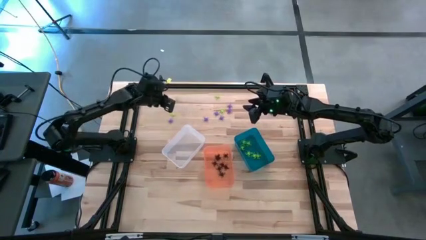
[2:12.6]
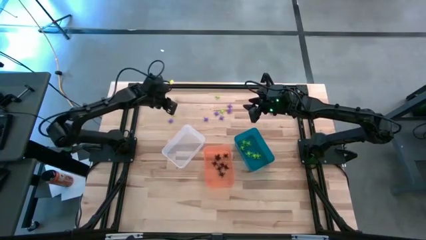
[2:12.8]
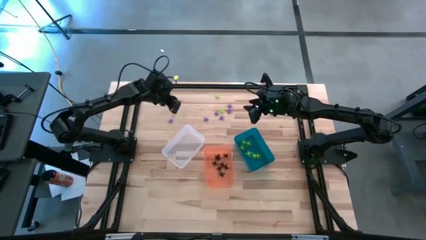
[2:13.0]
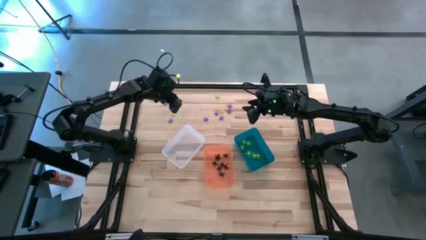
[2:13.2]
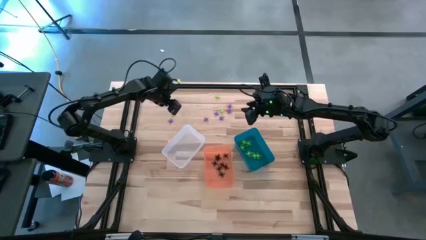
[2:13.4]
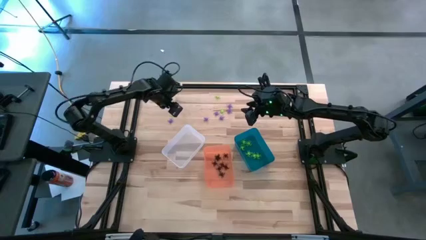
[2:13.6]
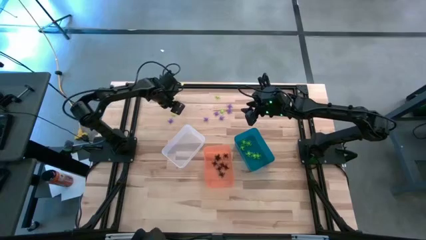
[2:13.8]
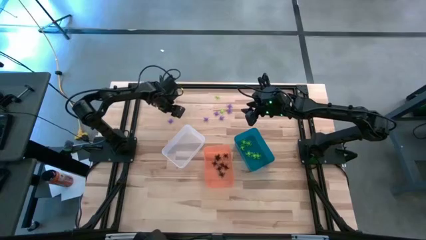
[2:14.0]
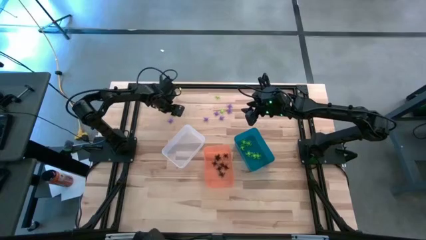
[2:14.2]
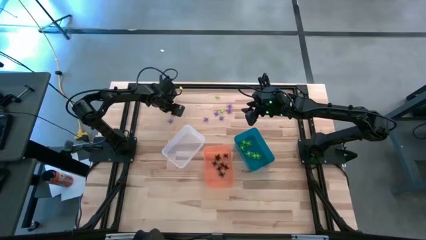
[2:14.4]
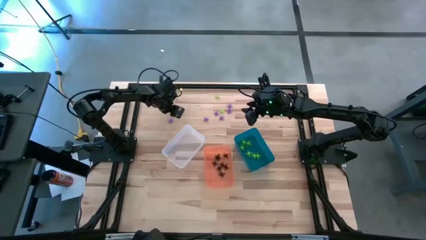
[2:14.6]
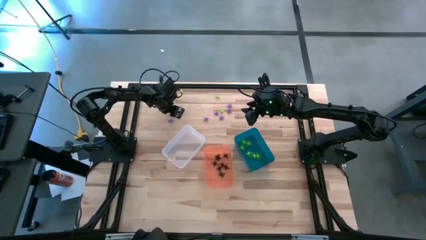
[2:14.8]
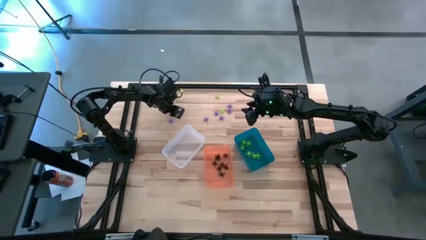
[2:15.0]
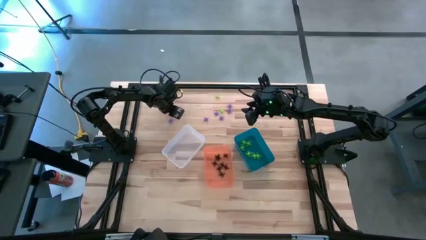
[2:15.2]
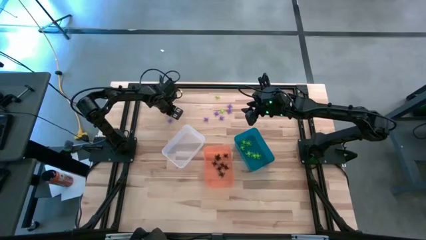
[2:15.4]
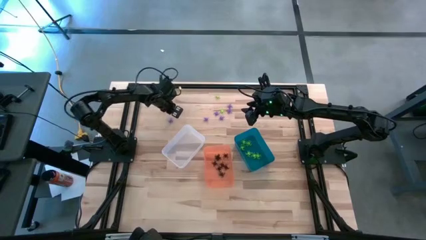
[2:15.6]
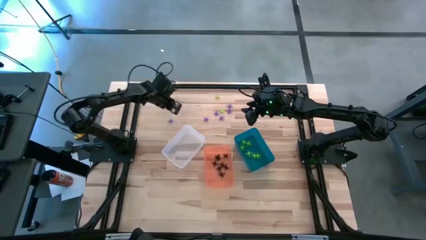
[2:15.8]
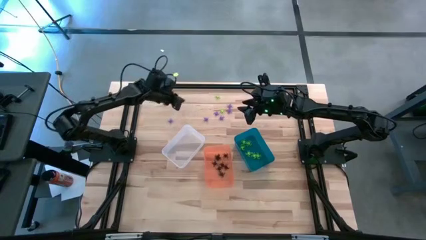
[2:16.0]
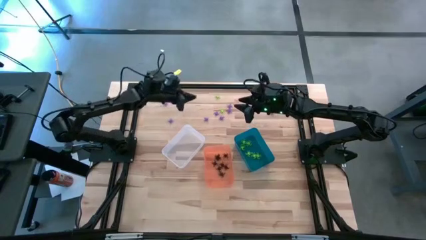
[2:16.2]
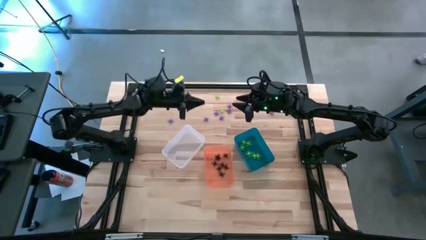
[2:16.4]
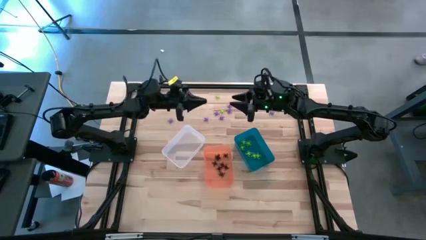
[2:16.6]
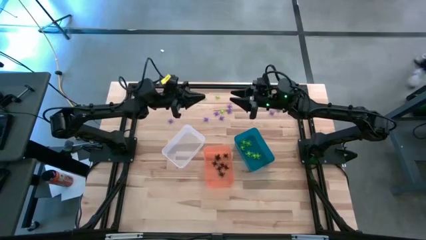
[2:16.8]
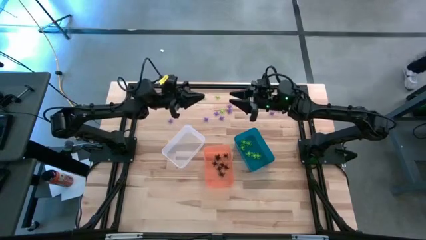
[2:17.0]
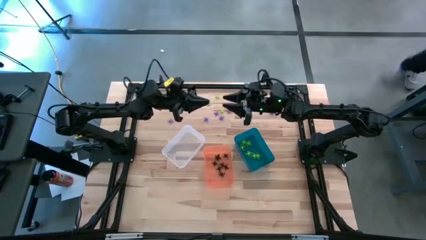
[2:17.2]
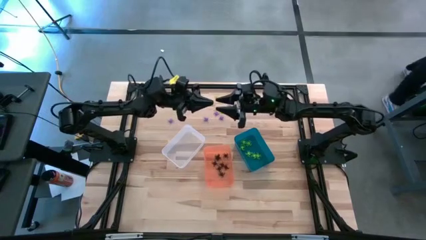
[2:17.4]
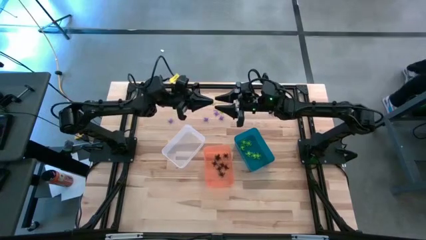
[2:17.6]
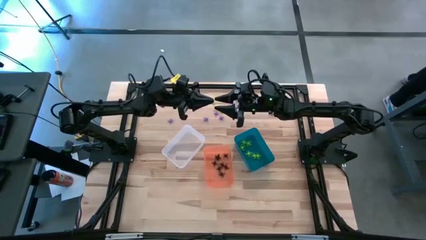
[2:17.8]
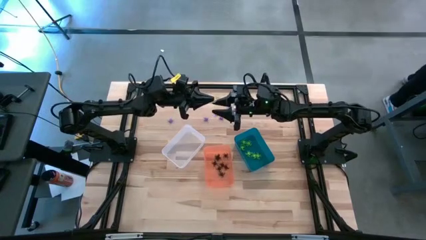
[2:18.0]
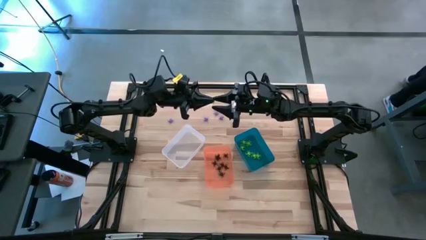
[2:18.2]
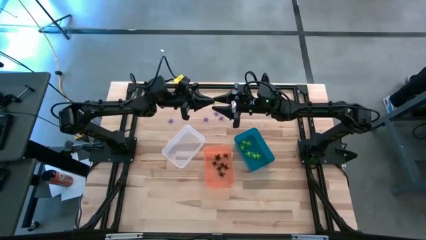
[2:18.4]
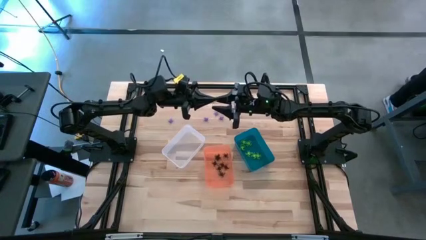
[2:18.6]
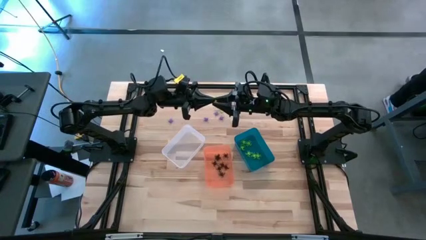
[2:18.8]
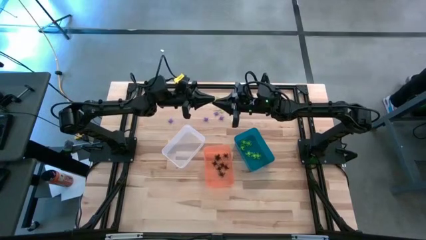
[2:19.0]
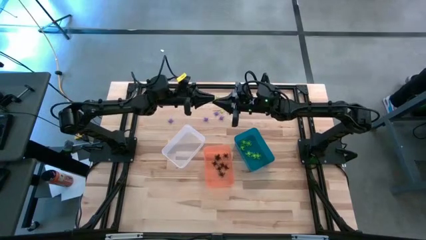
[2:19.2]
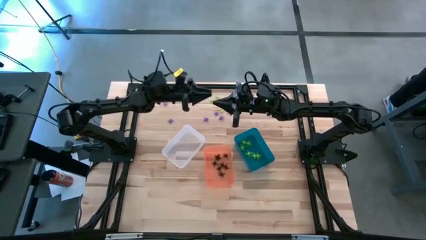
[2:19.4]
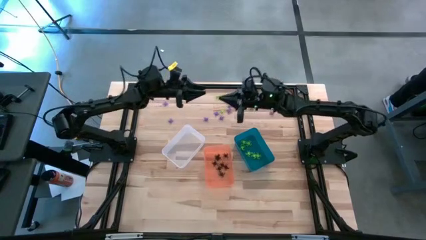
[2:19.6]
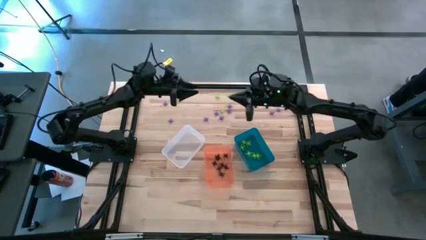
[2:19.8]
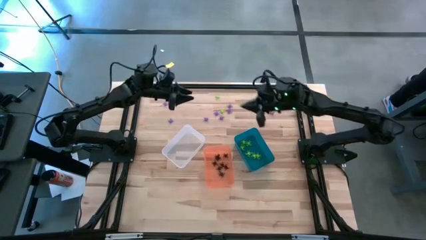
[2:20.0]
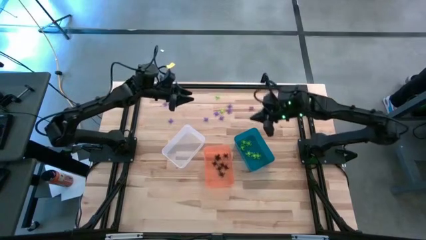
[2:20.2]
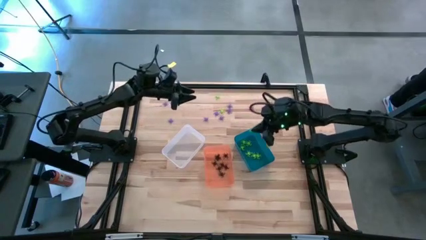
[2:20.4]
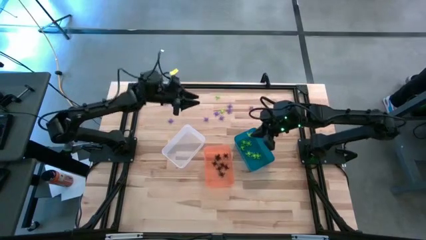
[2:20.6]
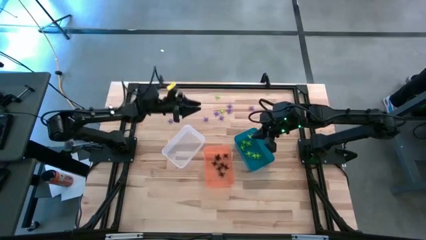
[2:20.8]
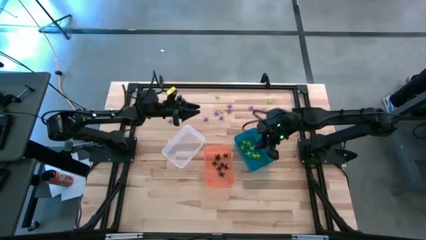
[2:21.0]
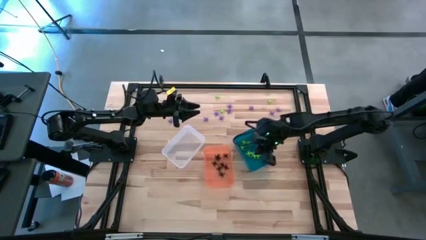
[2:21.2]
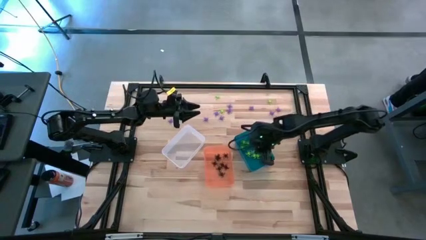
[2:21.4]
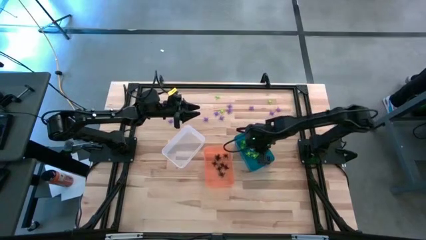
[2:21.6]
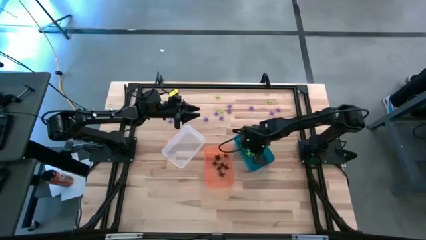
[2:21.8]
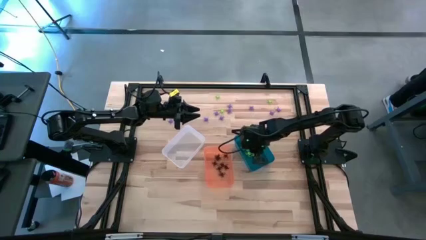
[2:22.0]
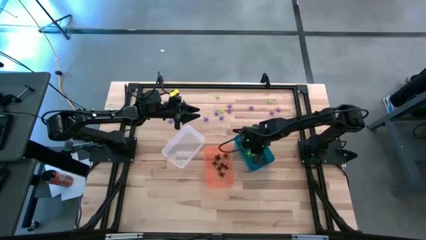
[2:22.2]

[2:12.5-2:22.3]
Task: Sort Halloween decoration
Put the green spider toy into the blue bin

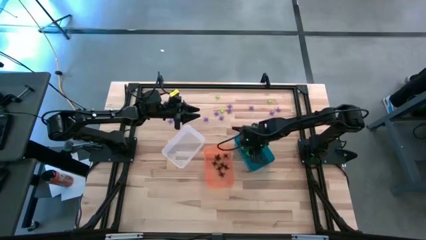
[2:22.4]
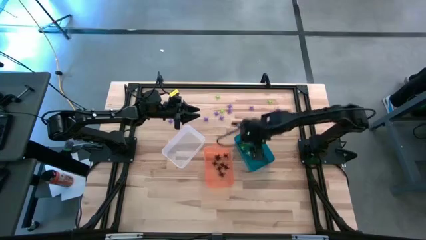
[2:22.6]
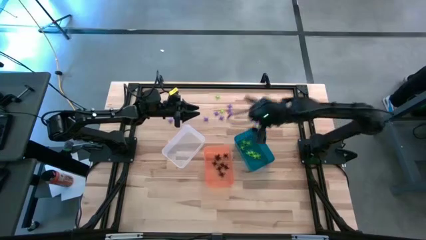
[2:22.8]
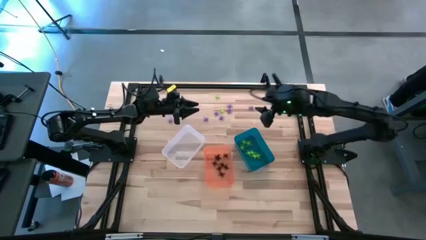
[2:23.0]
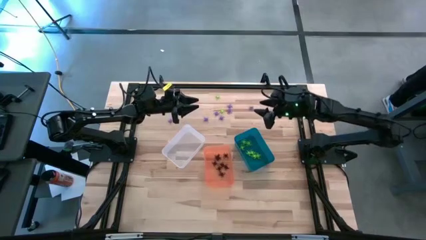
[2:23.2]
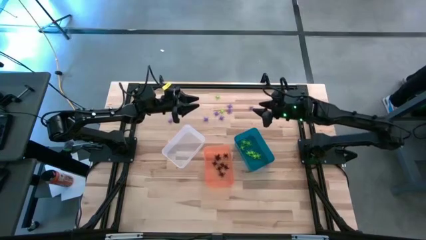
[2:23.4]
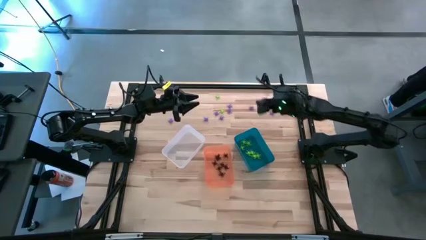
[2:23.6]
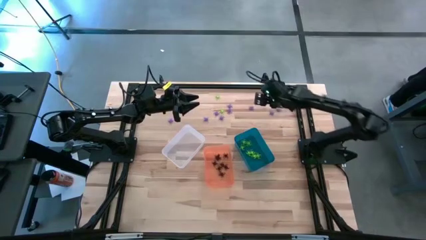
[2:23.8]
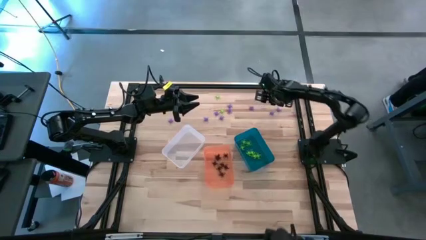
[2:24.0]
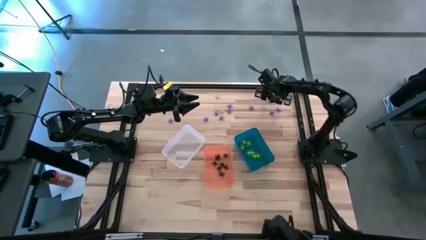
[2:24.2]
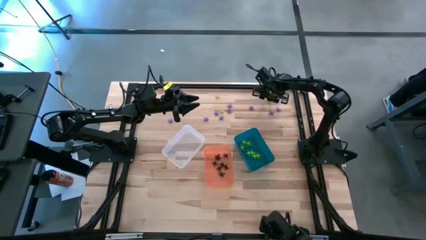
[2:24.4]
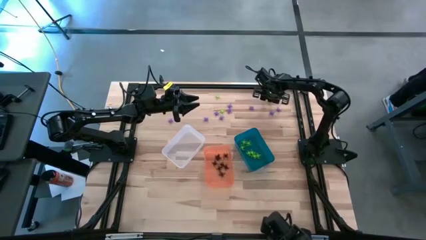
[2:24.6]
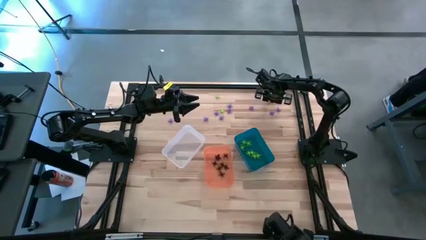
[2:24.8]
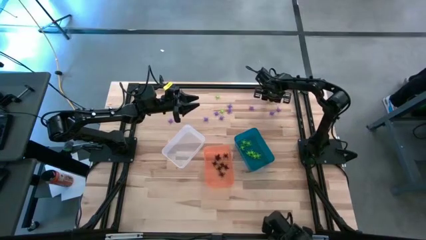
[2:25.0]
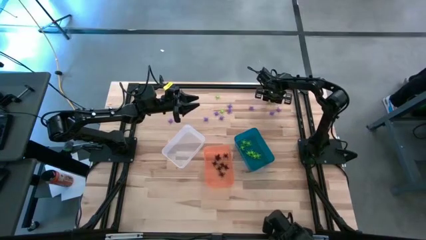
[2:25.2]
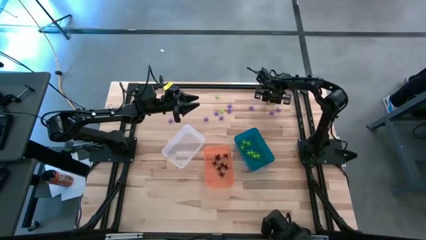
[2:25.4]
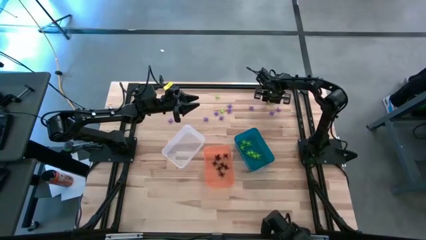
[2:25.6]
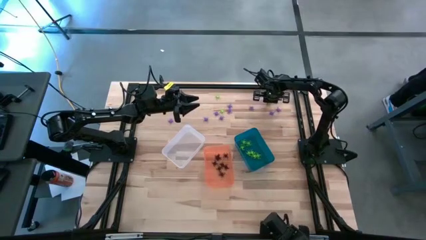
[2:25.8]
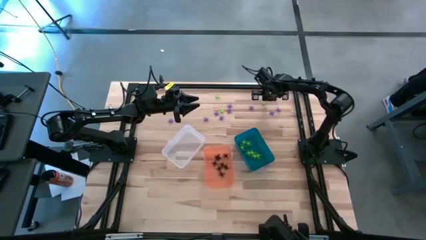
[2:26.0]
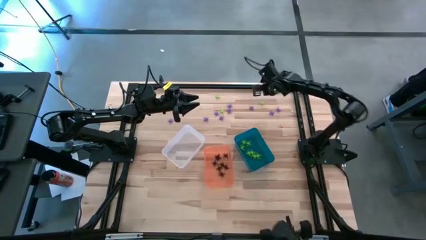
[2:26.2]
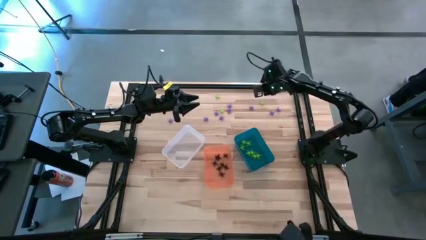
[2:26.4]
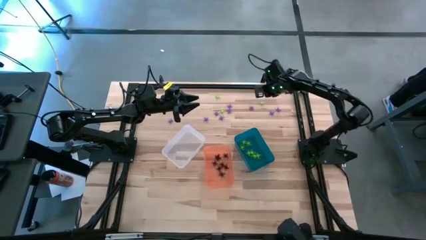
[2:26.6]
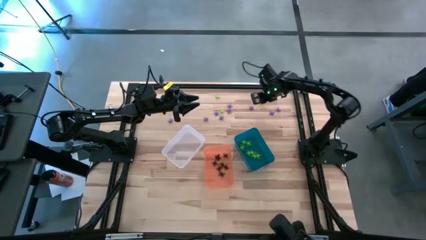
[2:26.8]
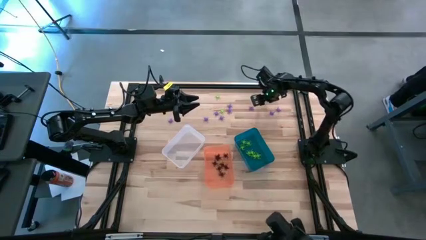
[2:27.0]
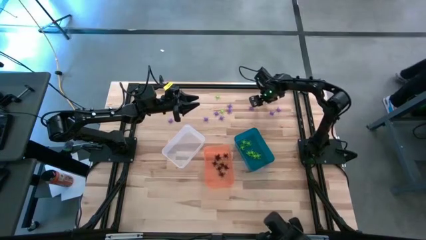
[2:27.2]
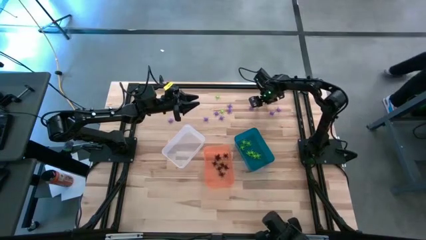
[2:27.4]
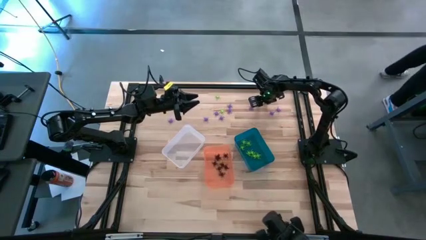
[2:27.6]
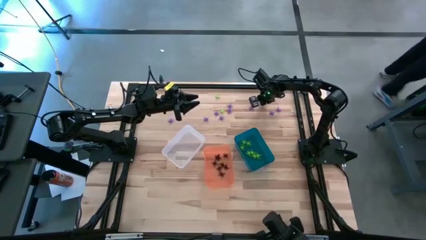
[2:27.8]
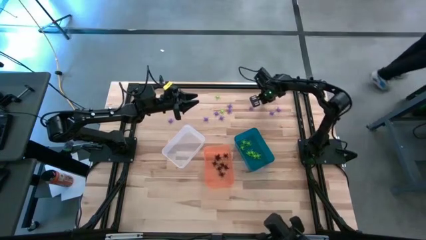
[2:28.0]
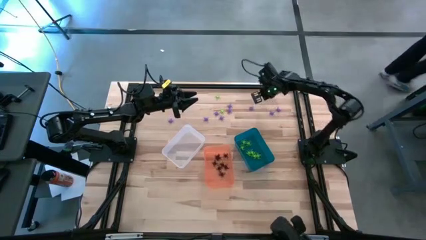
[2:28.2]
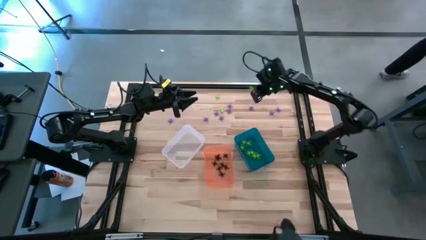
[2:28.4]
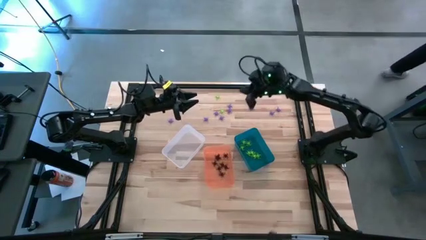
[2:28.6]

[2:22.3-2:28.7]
Put the green spider toy into the blue bin
